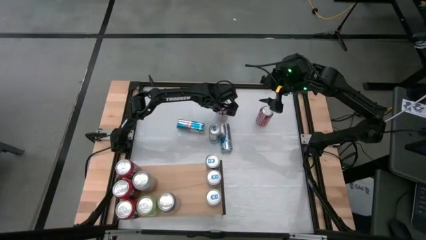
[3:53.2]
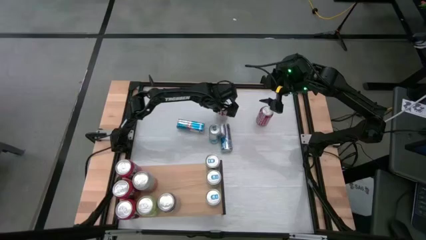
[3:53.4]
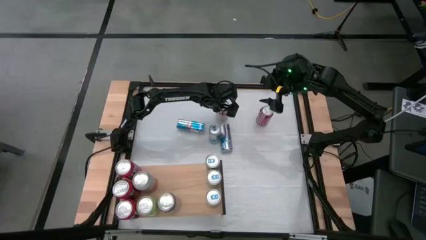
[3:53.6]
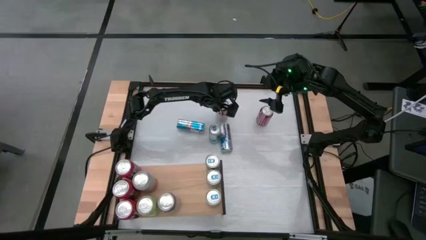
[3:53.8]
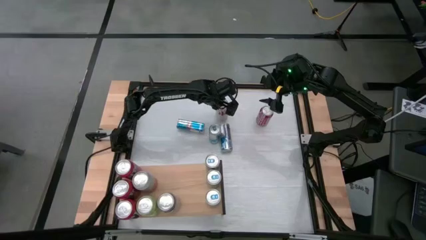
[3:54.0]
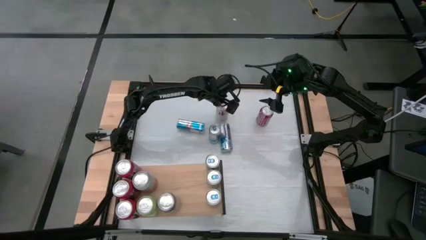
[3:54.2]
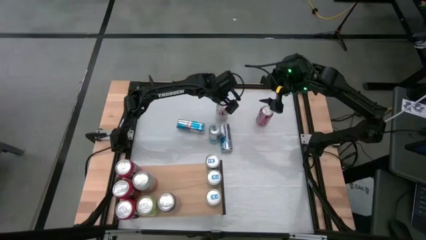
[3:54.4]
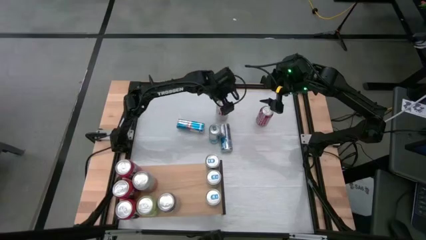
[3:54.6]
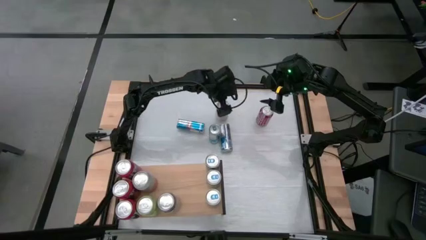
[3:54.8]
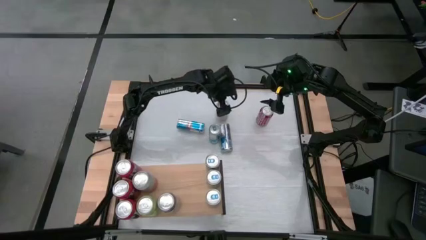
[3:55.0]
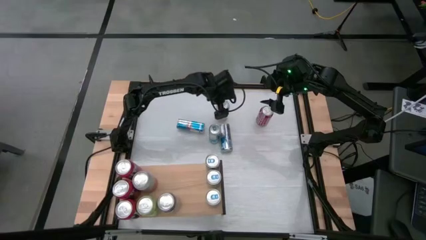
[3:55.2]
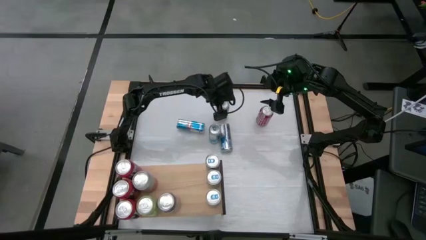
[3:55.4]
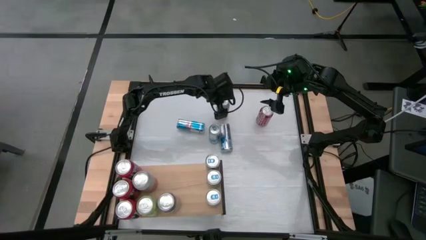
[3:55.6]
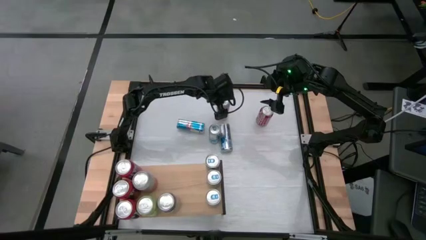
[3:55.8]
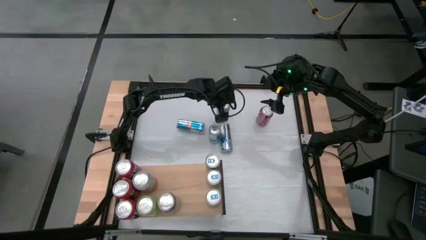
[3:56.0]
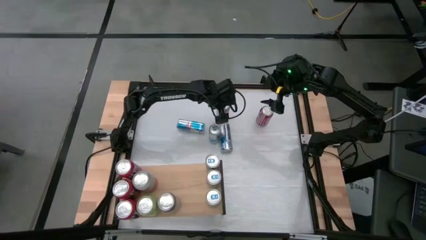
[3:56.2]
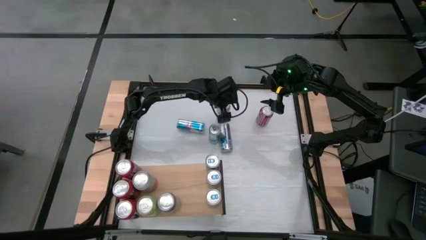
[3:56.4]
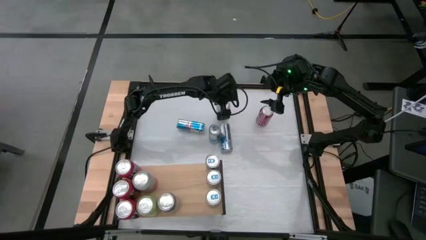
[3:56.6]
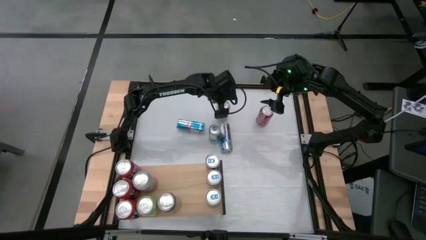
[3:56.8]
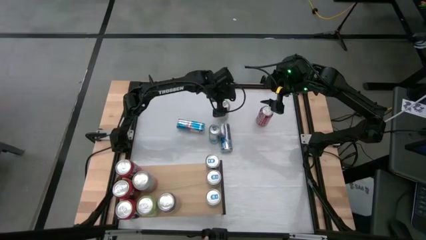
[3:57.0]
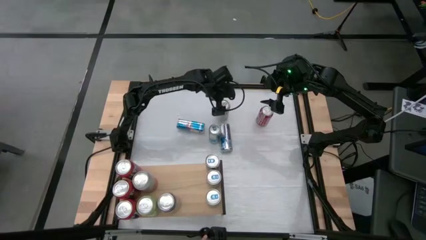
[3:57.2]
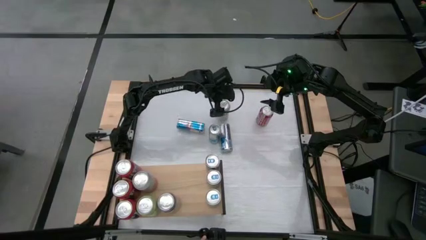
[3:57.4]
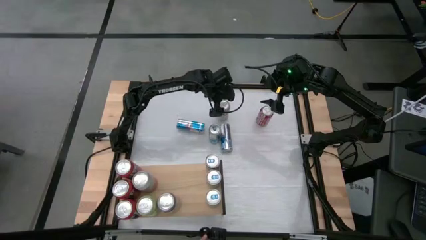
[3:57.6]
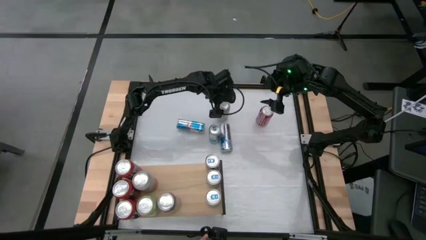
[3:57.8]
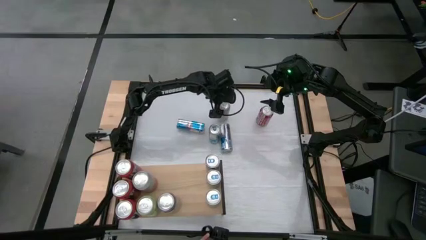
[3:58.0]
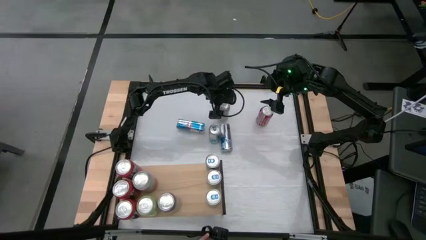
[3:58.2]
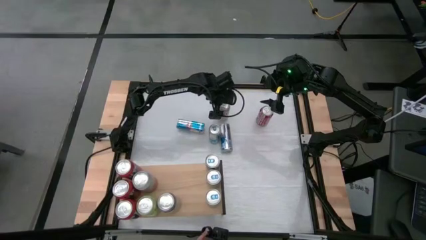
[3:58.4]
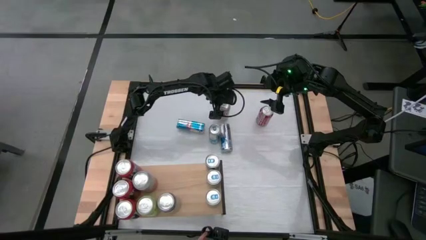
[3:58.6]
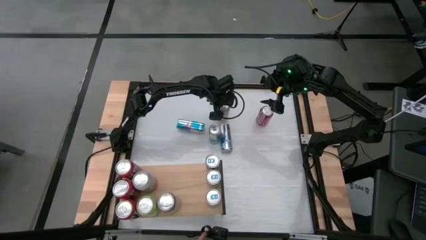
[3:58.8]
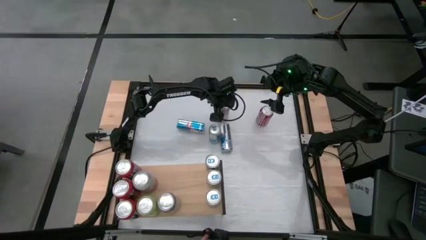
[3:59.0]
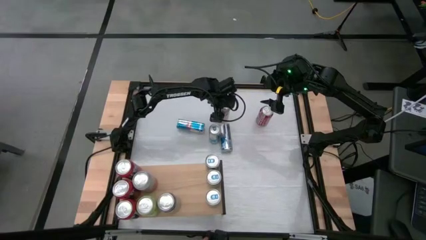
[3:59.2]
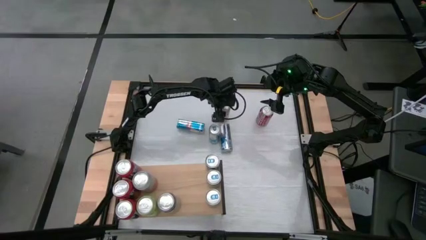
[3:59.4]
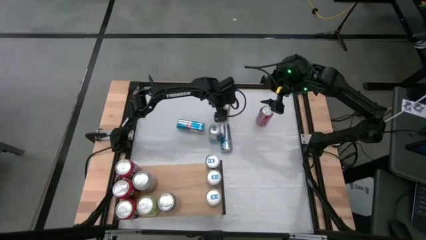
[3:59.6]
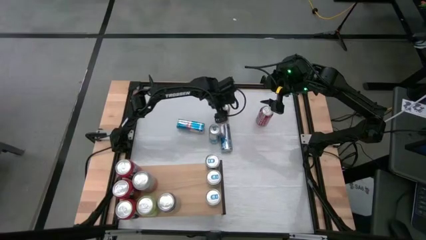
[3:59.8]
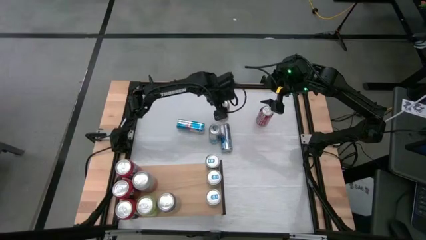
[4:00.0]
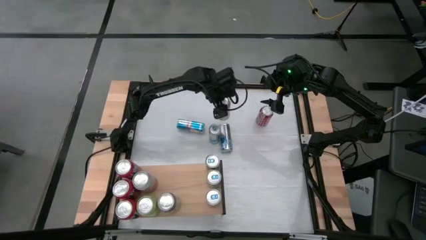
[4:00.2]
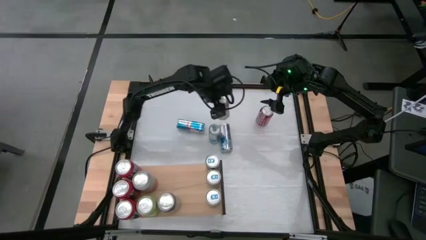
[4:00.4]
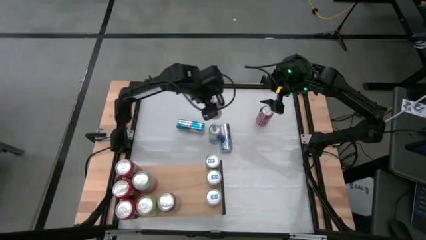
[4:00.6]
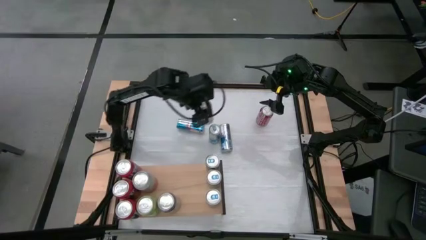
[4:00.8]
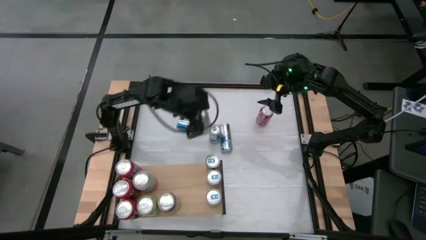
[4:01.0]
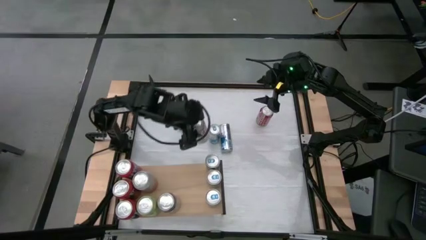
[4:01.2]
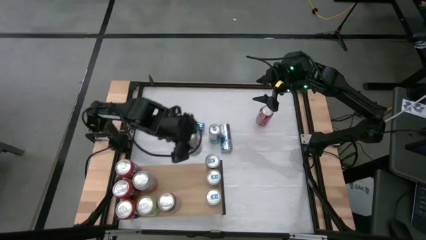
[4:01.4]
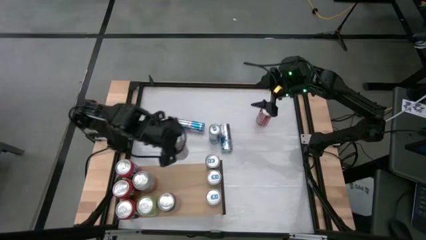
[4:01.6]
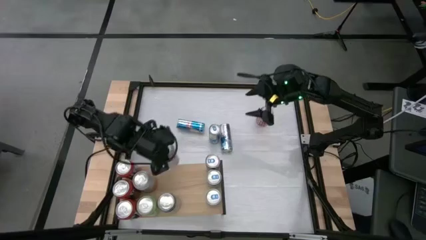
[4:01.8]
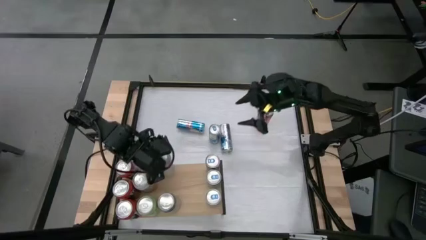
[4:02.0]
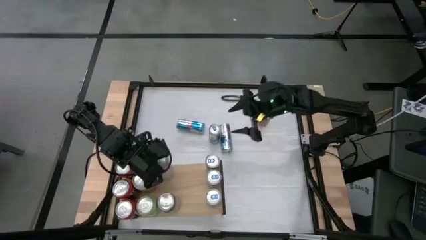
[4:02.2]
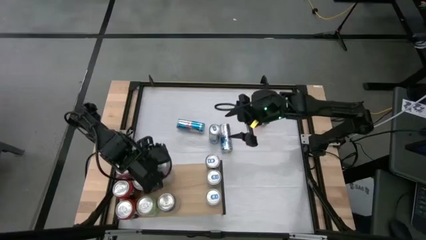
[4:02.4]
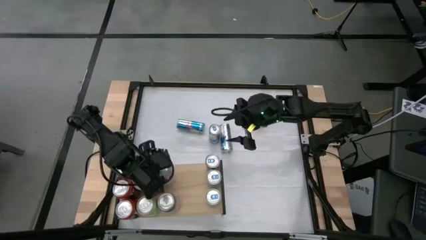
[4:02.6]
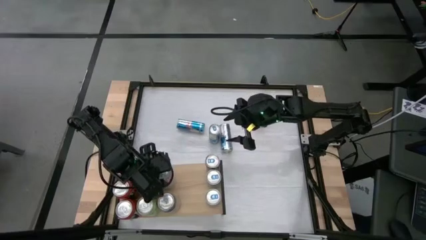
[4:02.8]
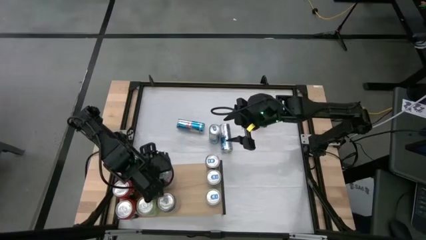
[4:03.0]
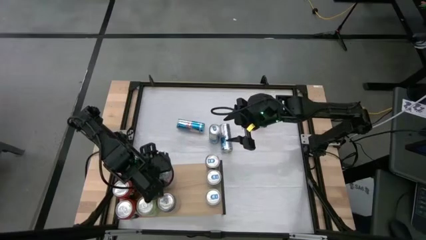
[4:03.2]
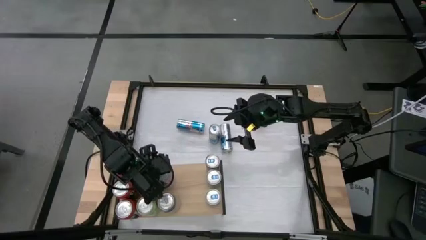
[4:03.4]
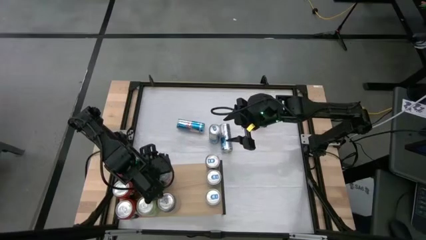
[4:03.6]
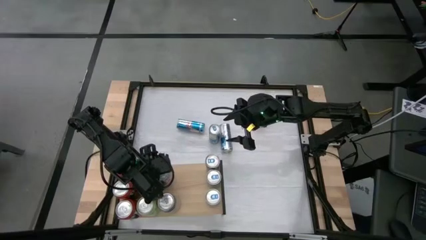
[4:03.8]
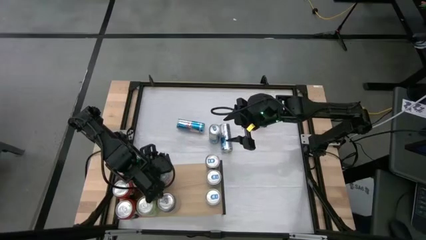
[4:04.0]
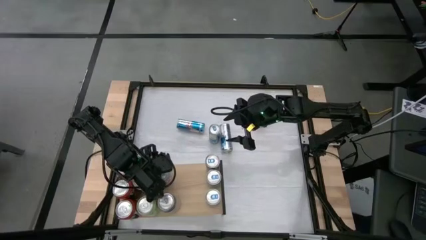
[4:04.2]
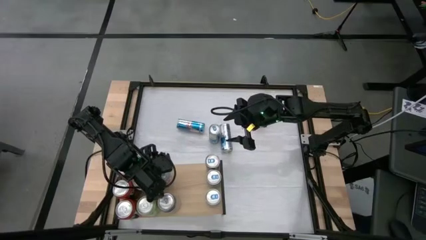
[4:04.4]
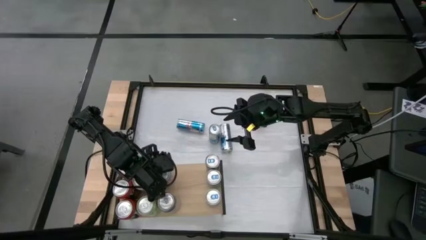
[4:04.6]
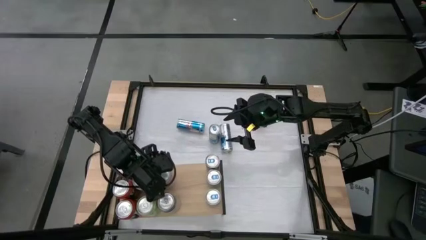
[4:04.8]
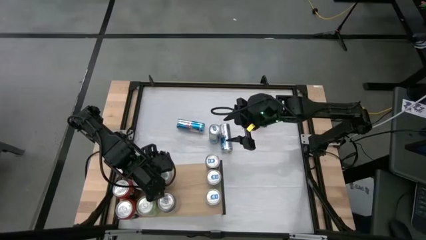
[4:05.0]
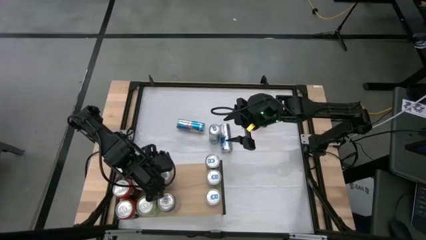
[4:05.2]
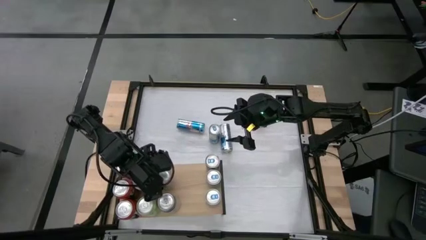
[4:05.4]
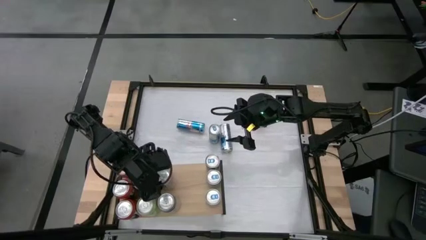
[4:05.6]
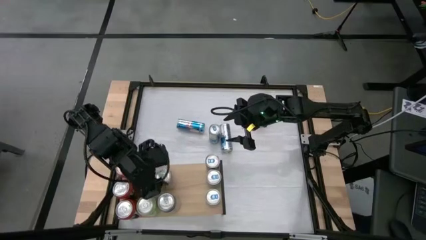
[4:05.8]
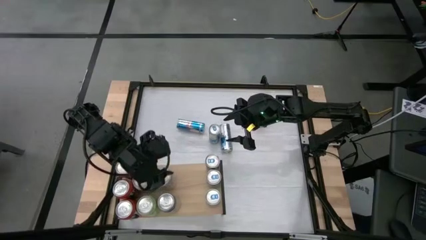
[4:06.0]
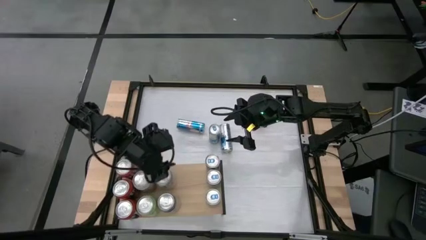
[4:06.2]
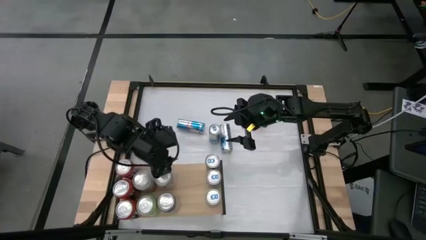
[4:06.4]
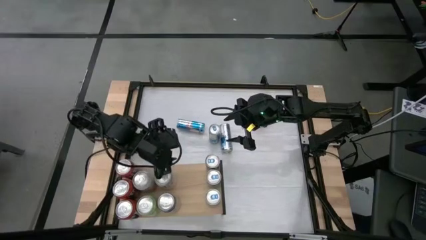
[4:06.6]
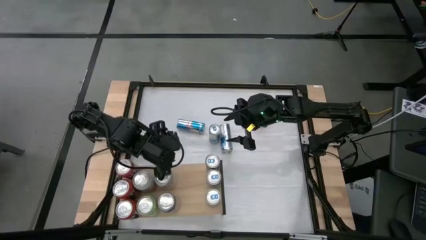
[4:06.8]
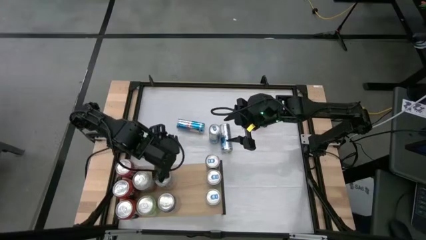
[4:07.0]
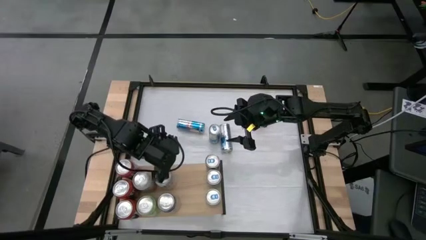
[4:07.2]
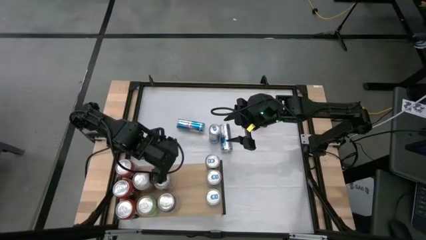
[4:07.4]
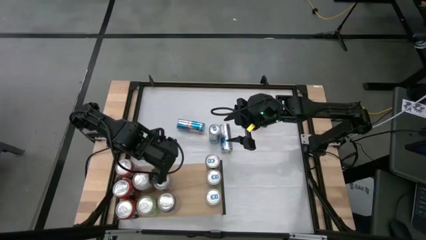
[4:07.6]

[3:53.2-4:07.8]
Task: Place canned beverage on shelf
Put the silver soda can on the shelf aligned with the silver soda can

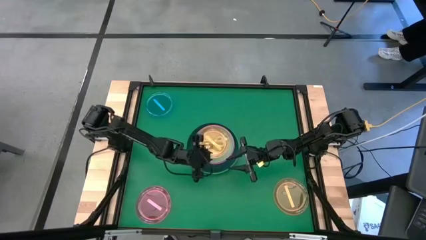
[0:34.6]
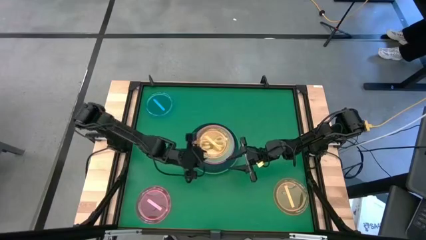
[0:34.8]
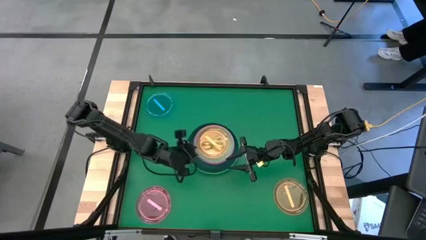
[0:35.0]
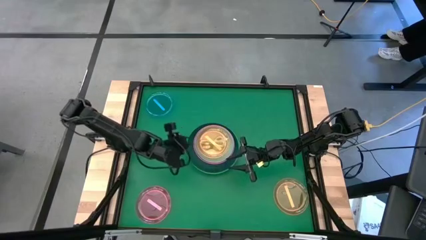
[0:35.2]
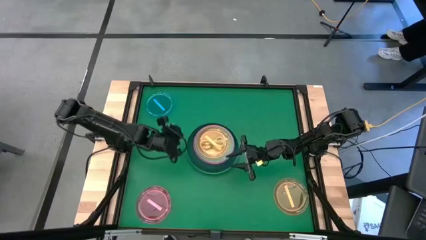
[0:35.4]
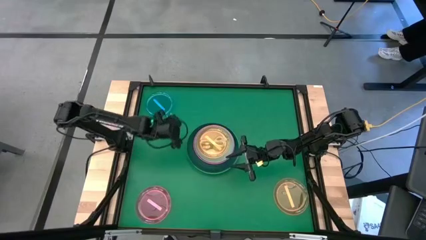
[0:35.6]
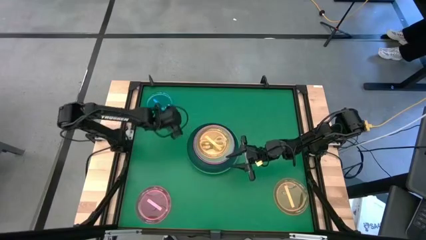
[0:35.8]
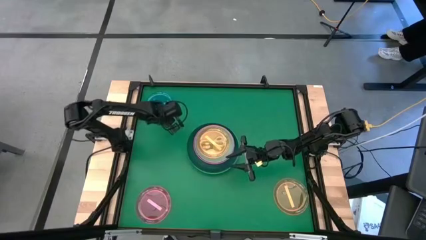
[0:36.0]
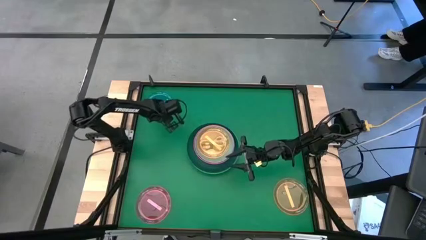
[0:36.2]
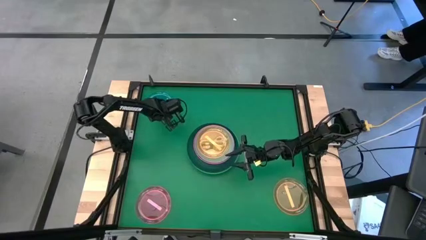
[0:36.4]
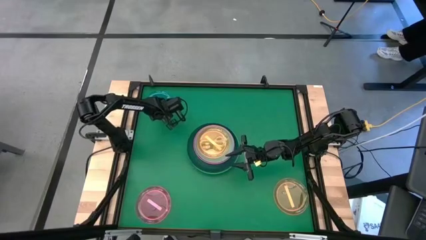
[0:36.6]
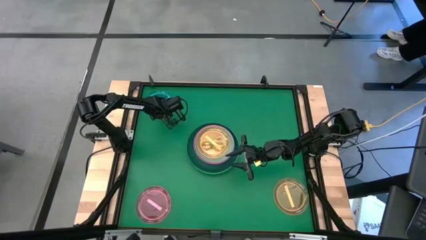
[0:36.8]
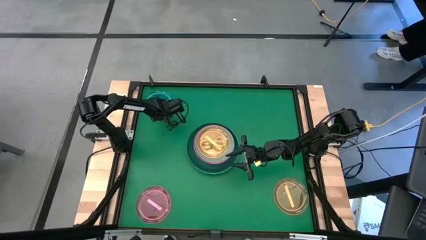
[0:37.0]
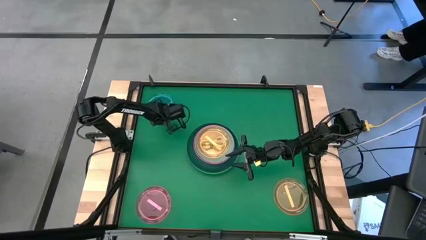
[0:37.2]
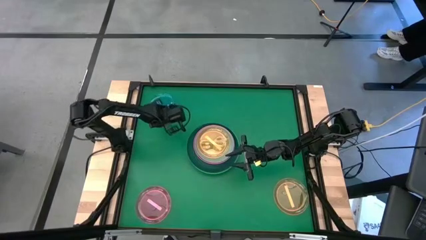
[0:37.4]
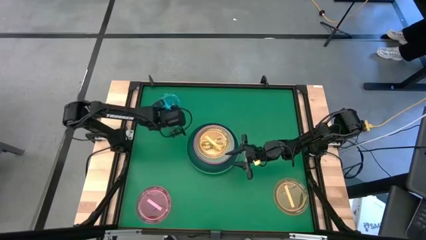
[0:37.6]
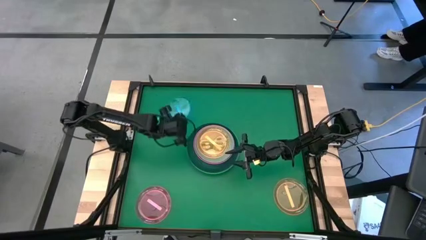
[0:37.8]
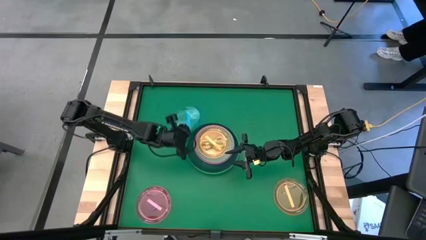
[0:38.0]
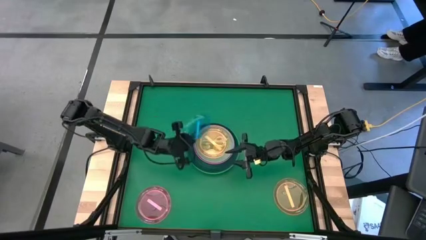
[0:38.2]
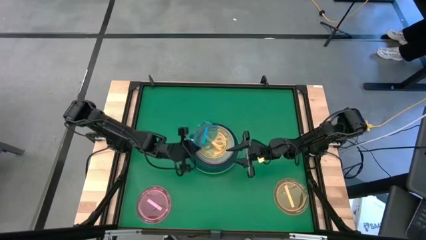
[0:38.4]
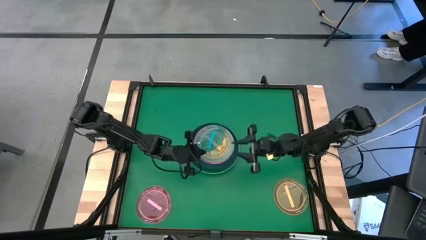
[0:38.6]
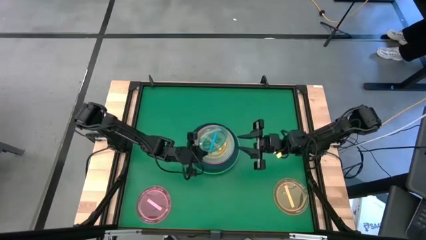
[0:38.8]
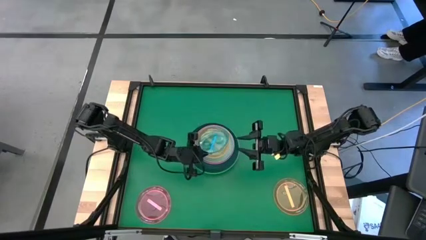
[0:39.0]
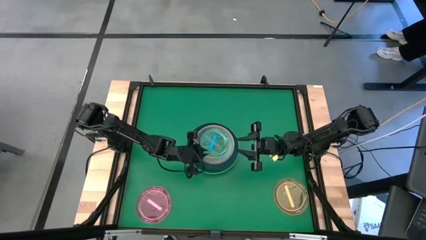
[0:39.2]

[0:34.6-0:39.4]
Task: Stack plastic plates
Stack the transparent blue plate on top of the transparent orange plate
